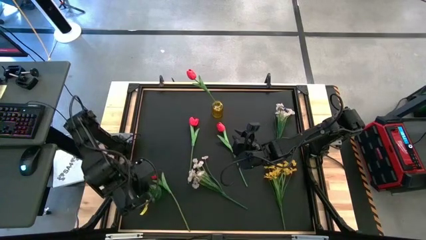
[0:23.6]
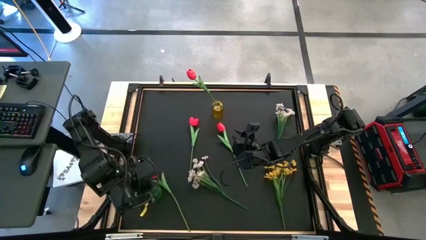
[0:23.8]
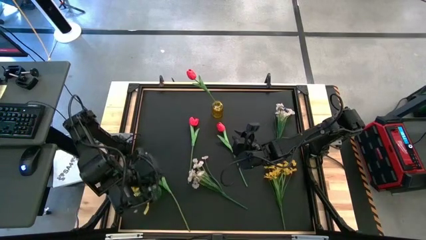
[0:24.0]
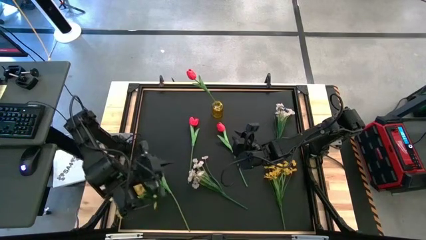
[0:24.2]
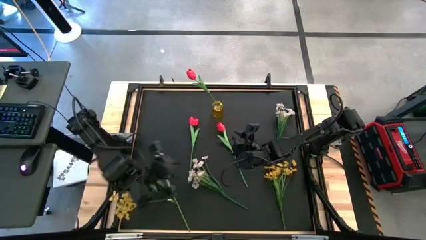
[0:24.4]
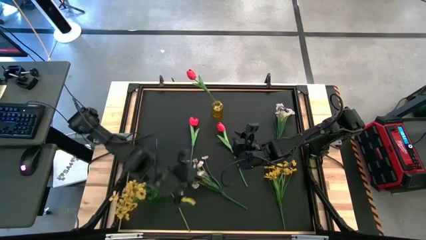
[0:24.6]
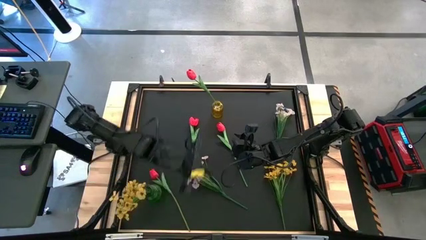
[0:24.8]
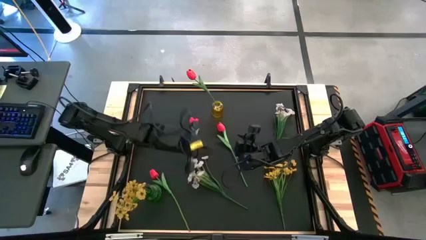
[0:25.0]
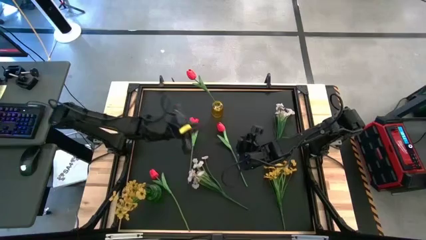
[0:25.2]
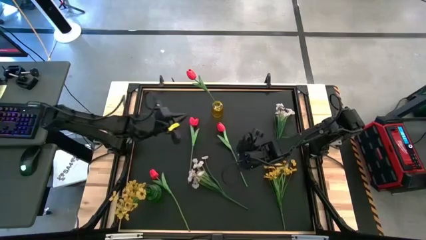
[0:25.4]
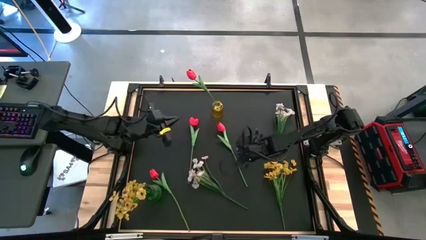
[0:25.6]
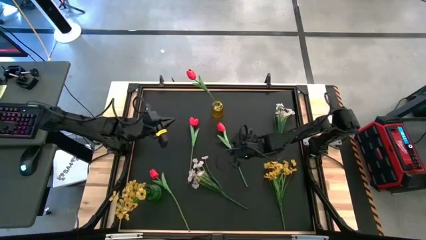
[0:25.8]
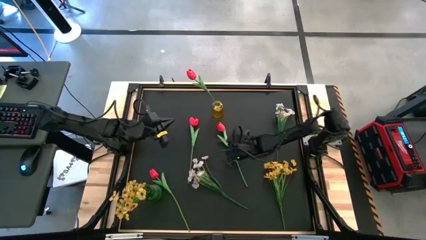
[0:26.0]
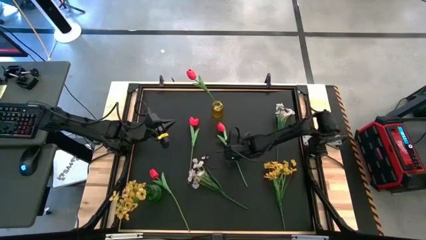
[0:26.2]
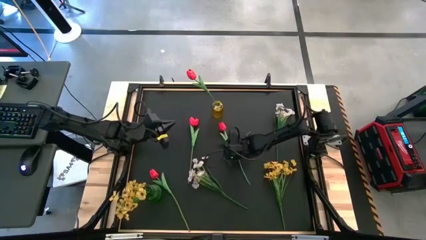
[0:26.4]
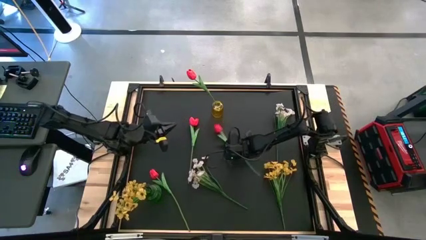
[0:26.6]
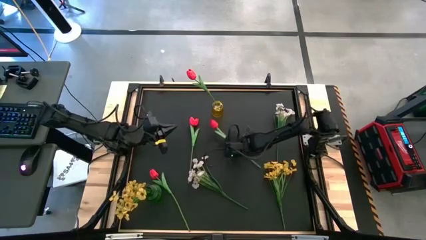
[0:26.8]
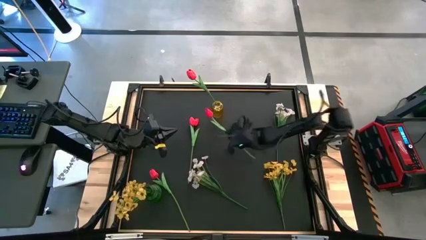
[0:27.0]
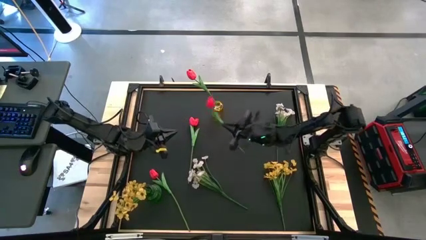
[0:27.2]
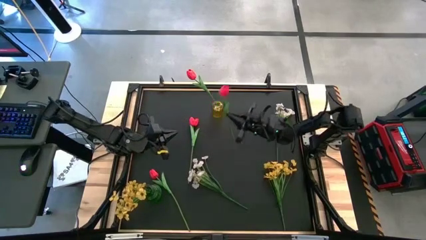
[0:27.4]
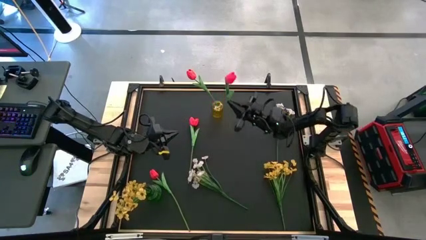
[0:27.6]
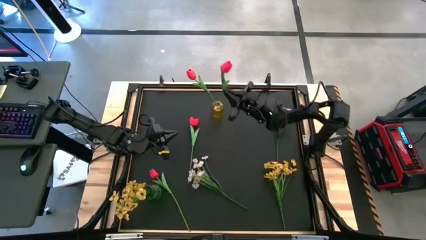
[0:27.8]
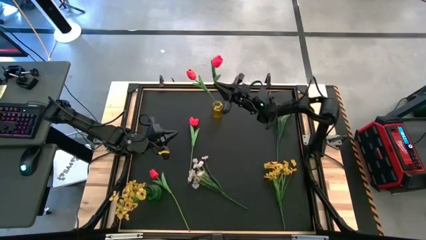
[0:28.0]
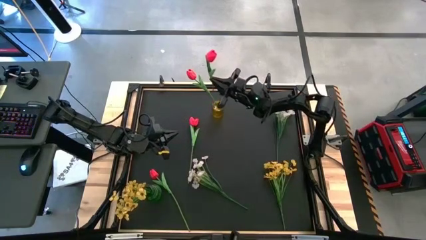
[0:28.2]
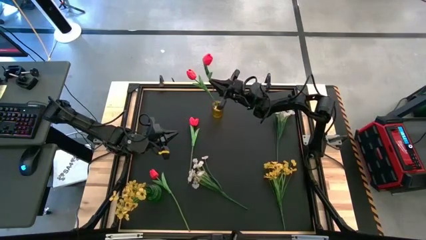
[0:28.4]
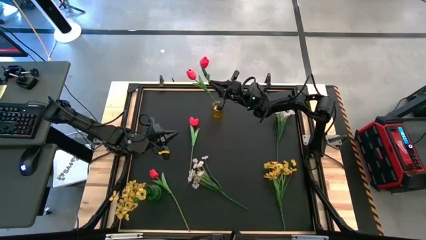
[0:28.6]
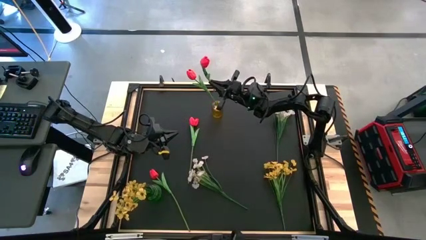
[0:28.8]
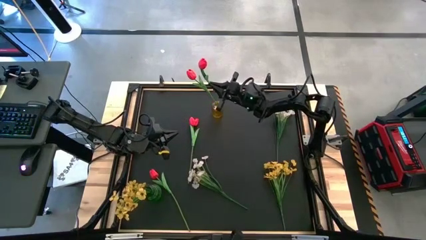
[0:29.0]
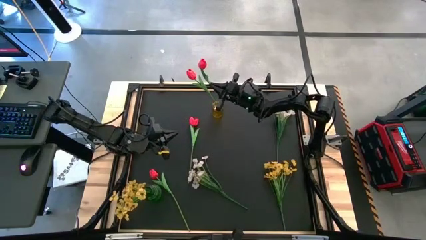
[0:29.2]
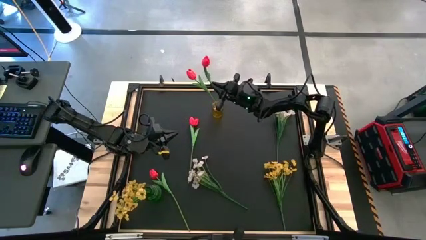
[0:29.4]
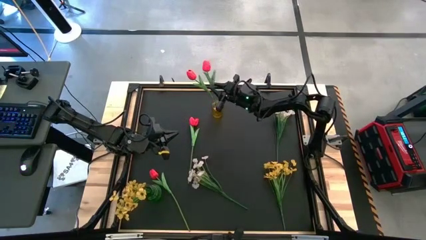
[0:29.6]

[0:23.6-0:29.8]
Task: Sort flowers into vase by color
Put the red flower into the yellow vase

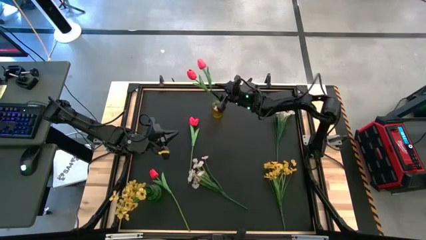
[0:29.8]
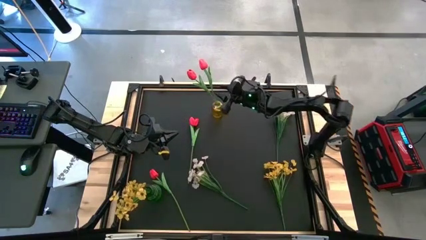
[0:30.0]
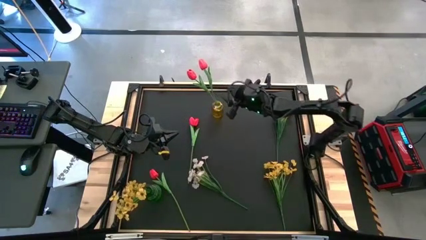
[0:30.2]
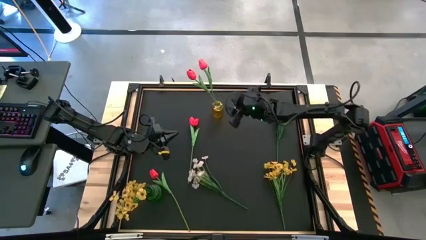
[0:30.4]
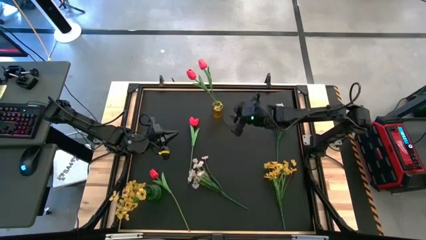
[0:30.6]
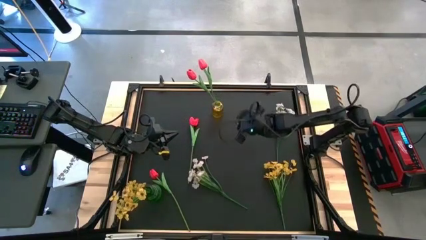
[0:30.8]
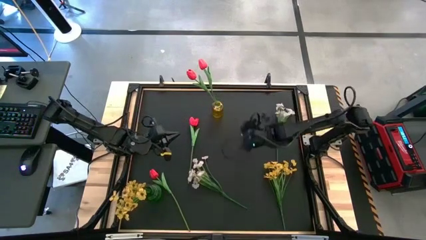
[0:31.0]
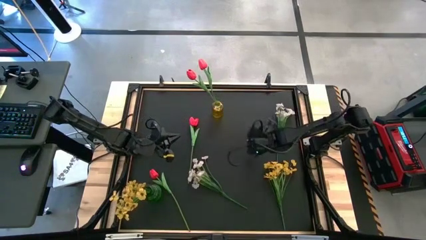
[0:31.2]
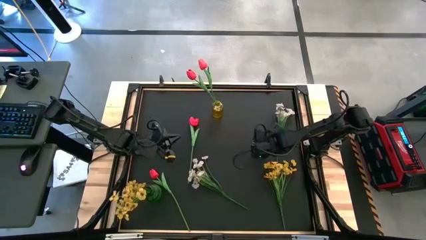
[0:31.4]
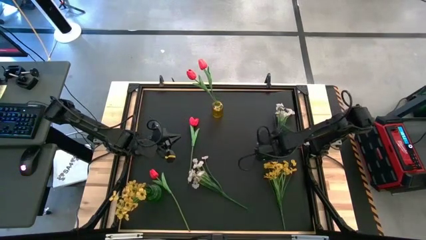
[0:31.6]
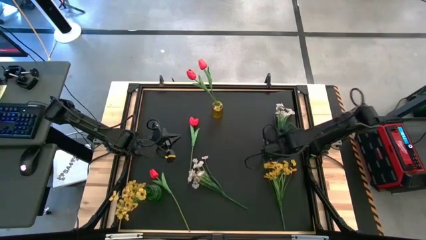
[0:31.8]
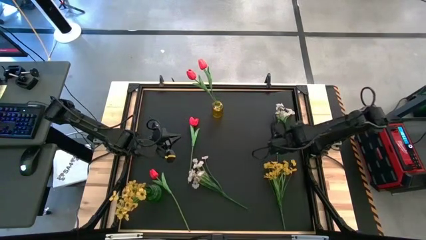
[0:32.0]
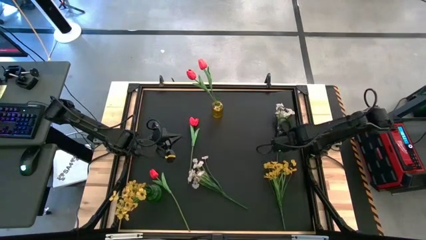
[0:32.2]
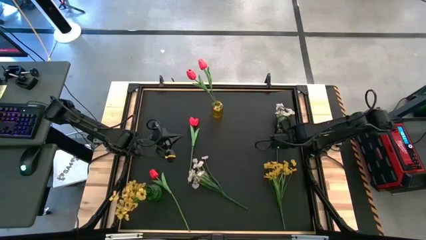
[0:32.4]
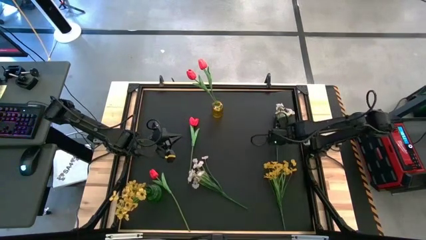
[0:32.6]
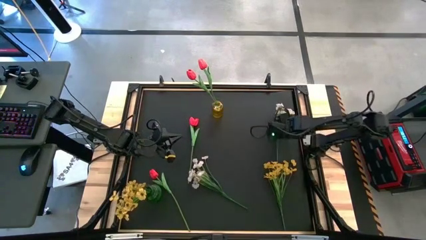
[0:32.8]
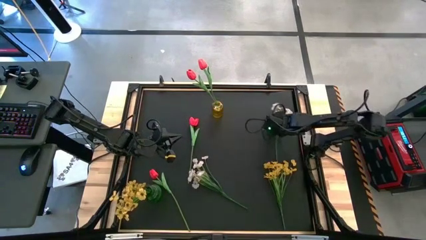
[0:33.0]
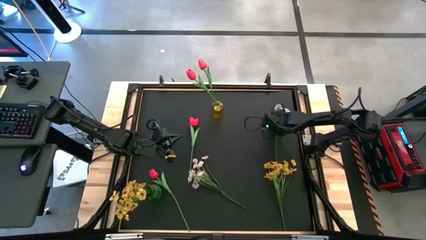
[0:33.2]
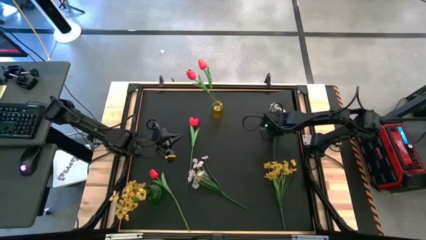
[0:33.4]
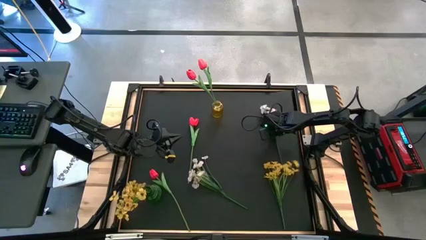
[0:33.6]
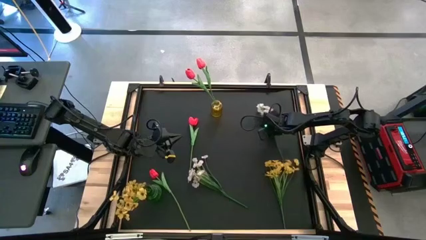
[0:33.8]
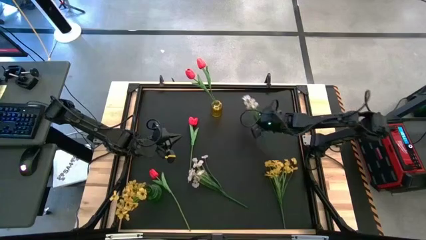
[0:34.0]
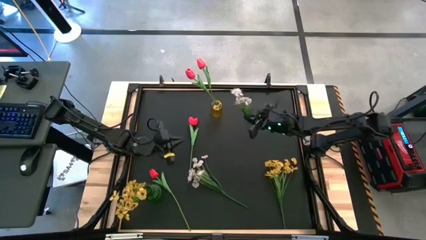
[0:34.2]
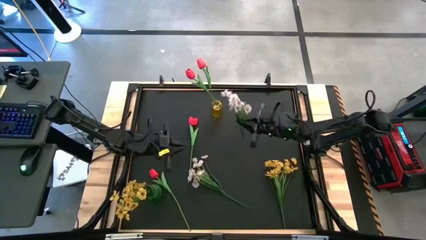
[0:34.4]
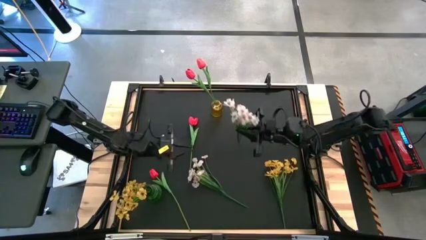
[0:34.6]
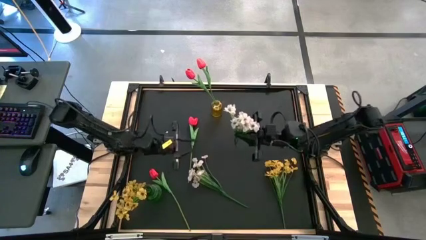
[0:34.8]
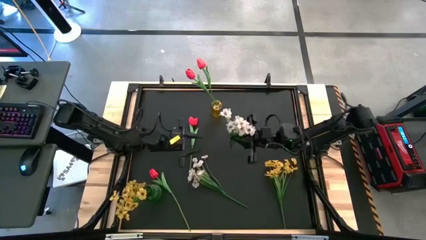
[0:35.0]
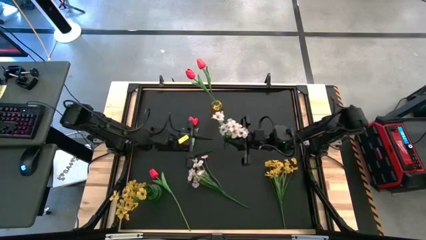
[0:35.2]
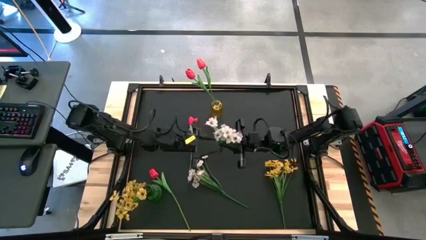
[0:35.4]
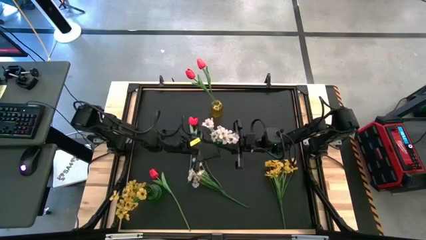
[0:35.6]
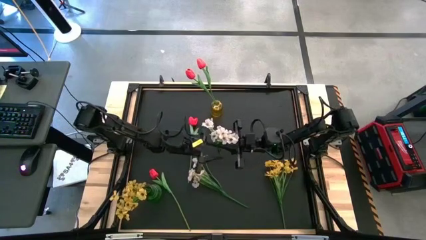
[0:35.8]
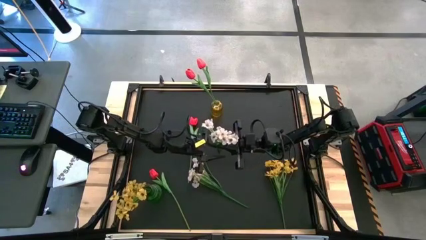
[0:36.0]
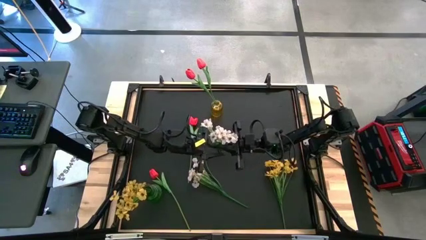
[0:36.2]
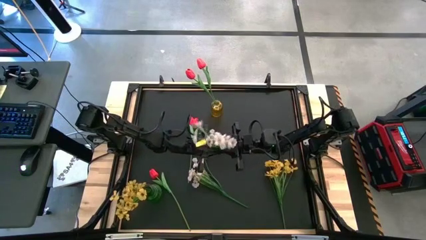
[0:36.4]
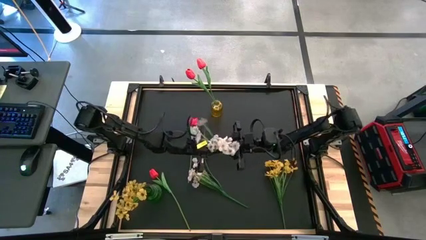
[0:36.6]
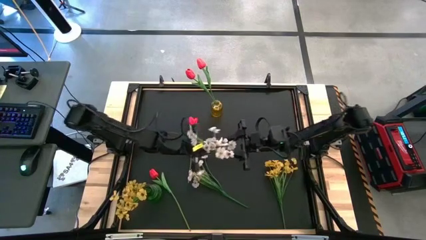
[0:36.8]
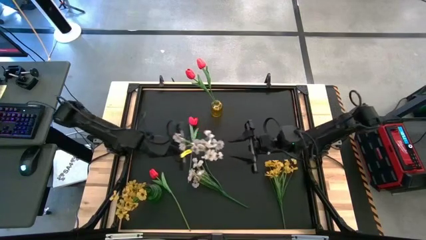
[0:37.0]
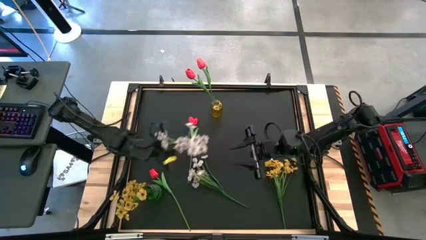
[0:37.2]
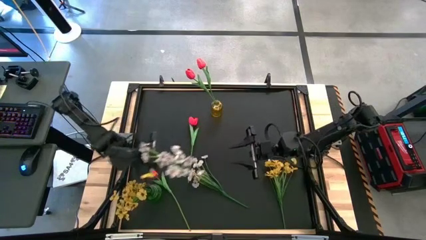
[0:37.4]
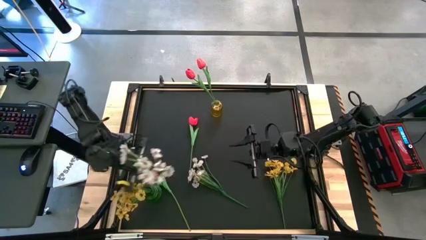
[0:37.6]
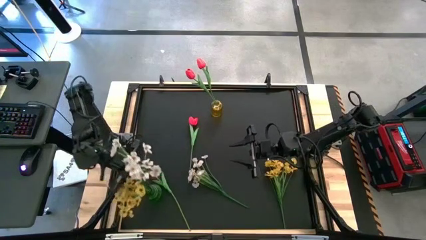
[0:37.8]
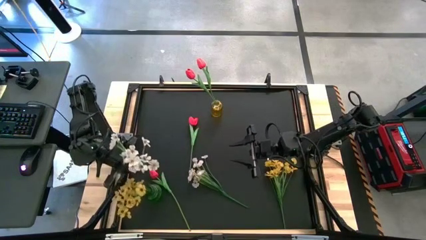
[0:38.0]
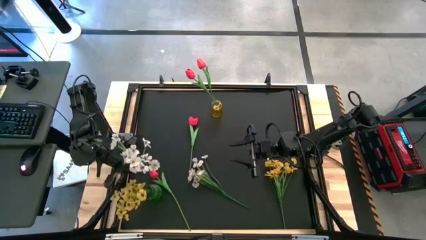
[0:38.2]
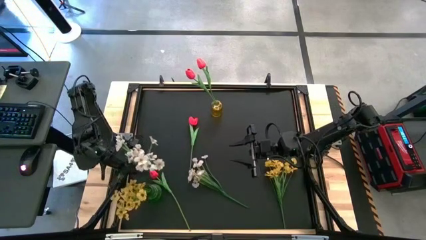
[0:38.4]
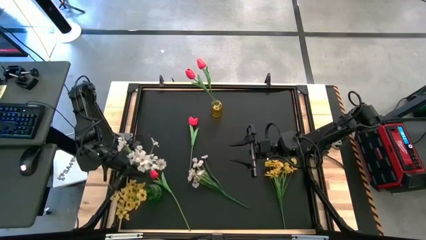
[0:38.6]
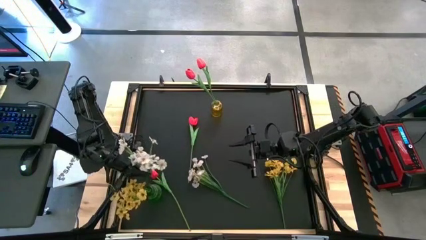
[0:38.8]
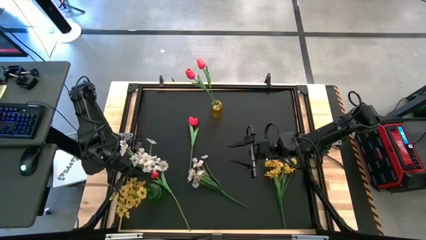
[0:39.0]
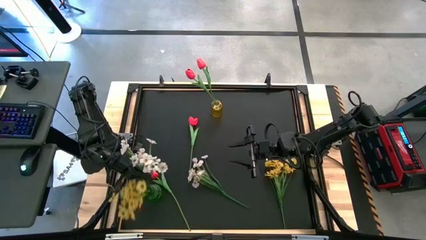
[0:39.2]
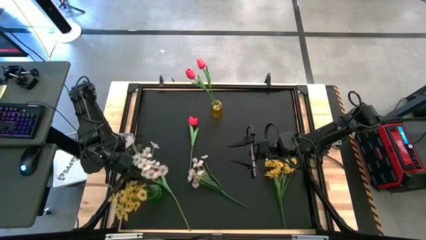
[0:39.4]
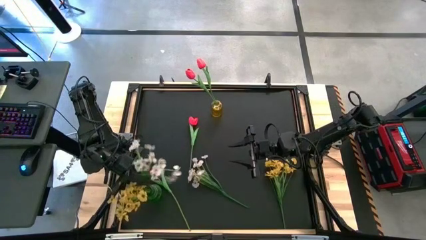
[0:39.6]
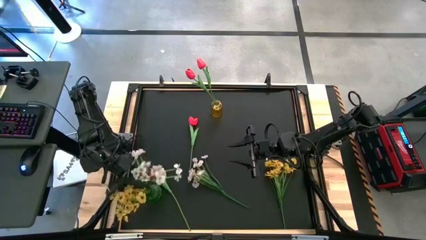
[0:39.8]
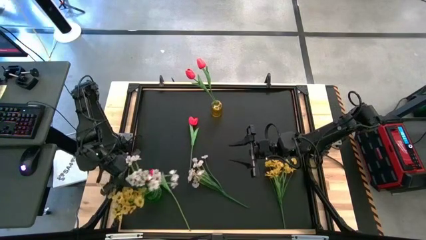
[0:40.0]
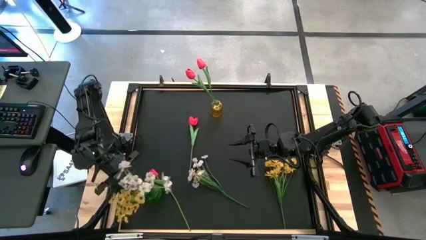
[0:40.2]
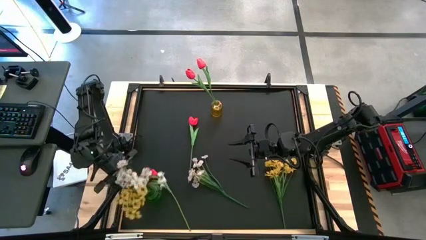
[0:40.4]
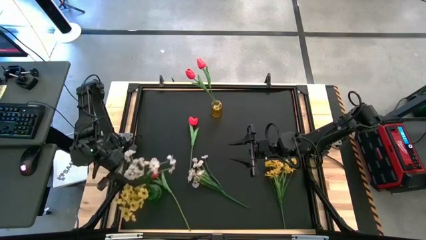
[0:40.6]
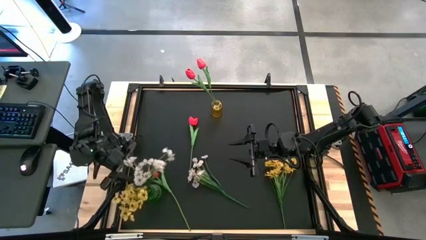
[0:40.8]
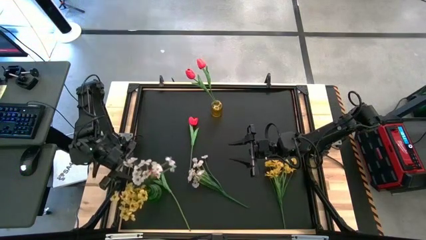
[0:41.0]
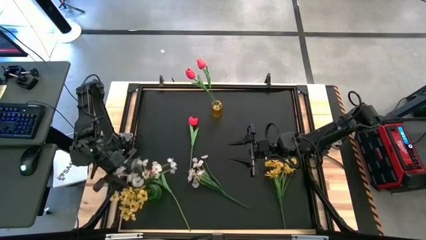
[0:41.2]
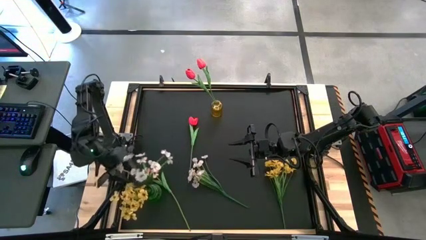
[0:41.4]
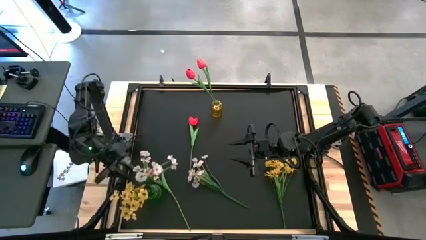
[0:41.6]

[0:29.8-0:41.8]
Put the white flowers into the green vase
